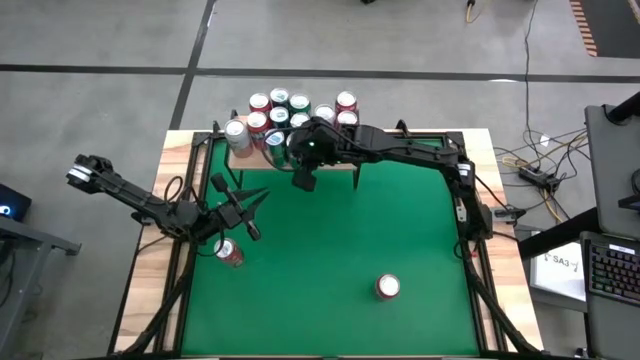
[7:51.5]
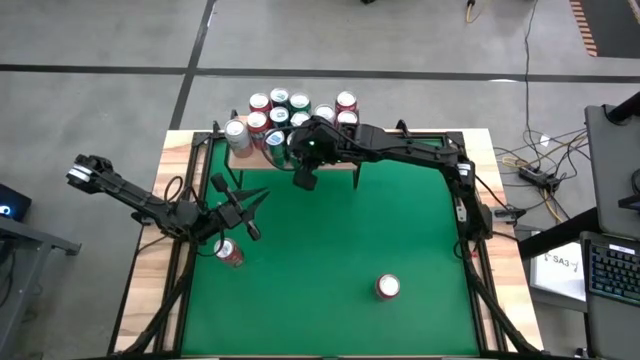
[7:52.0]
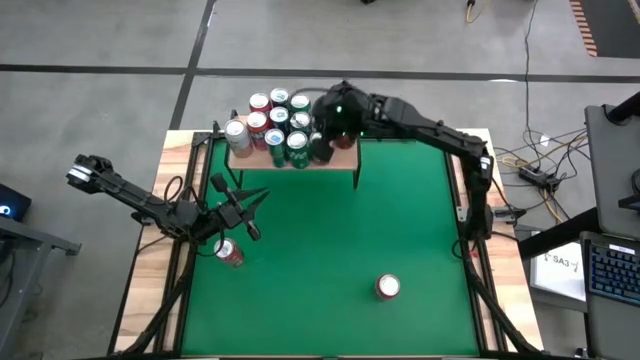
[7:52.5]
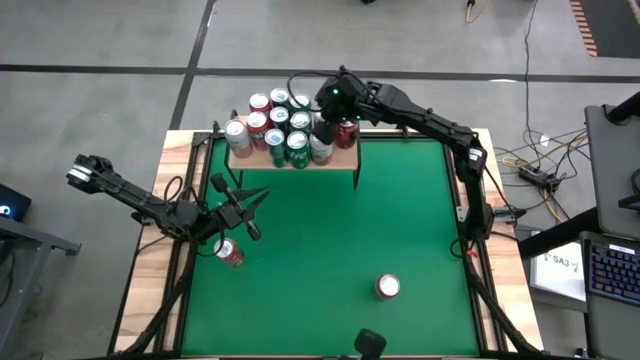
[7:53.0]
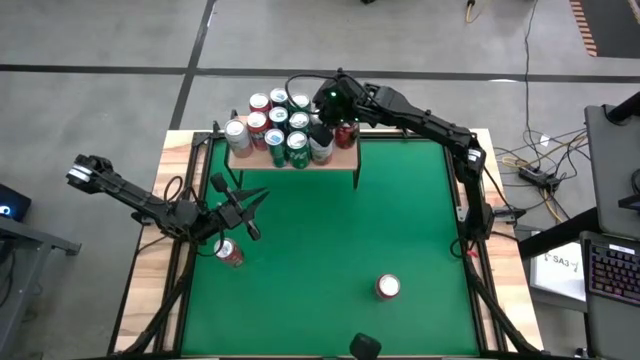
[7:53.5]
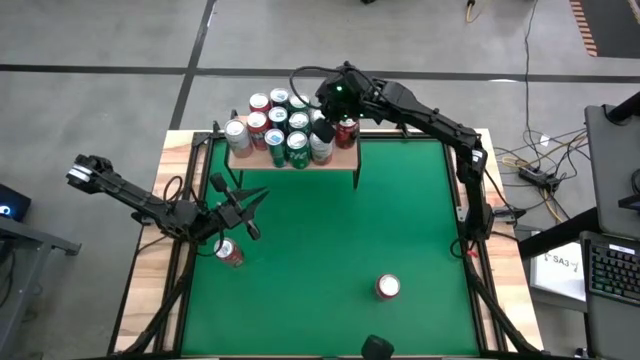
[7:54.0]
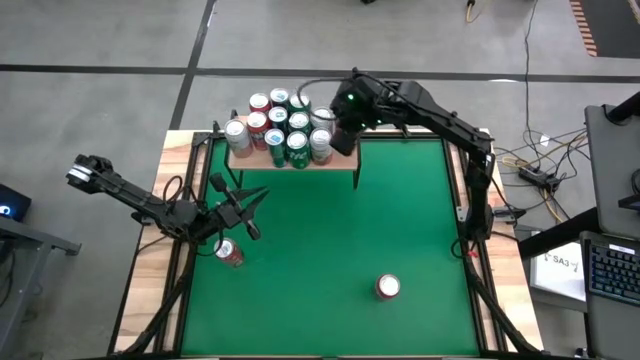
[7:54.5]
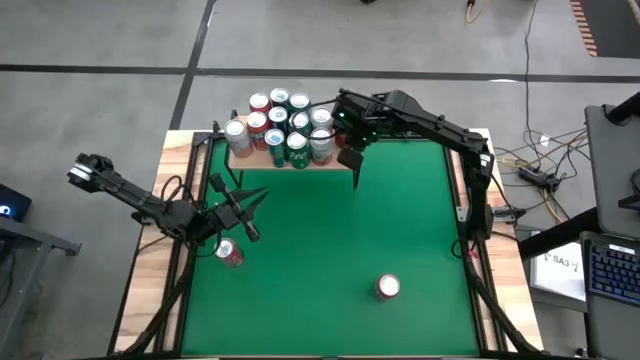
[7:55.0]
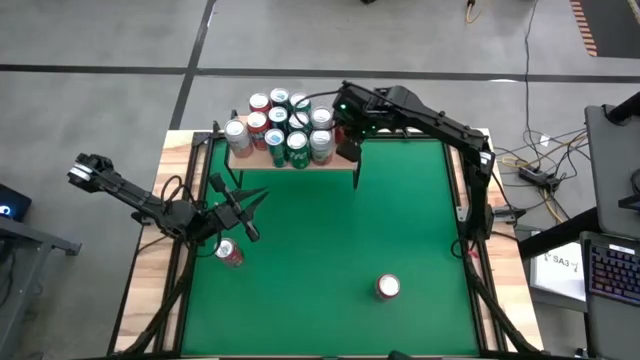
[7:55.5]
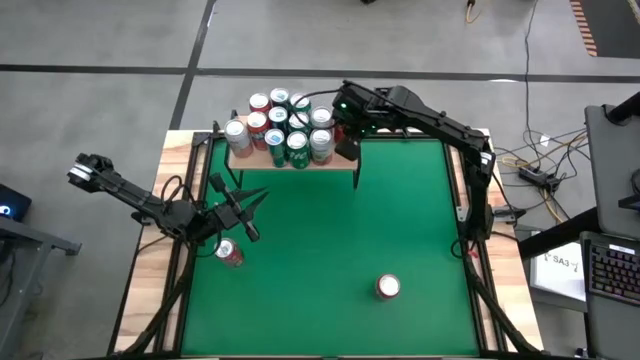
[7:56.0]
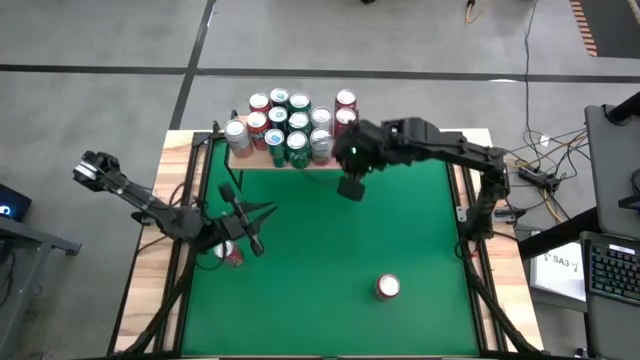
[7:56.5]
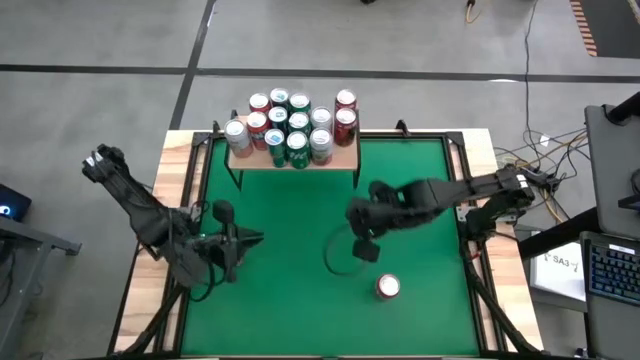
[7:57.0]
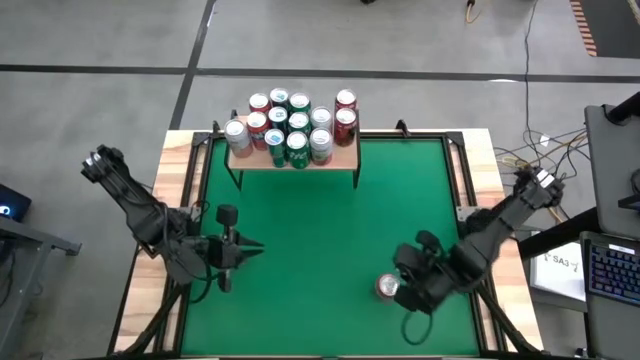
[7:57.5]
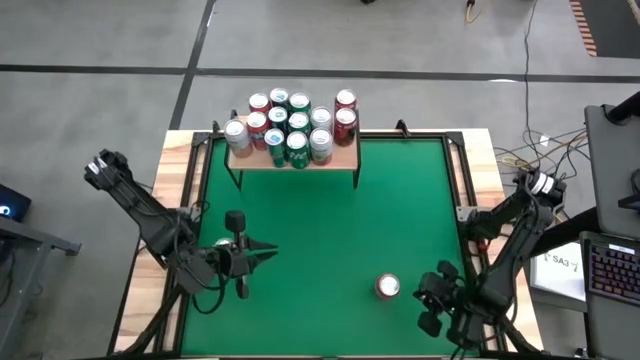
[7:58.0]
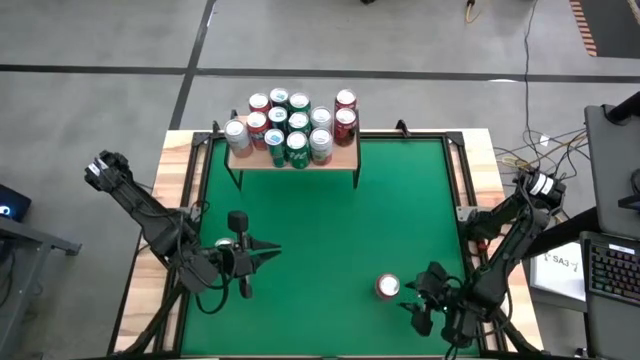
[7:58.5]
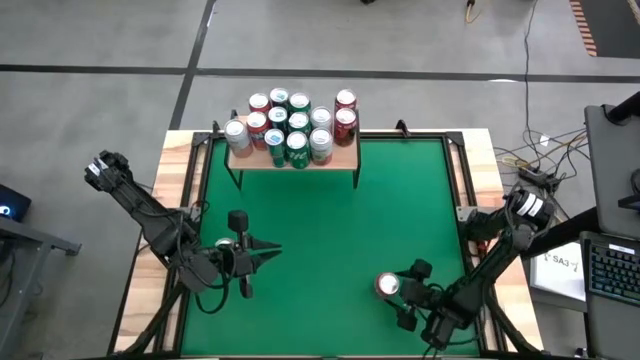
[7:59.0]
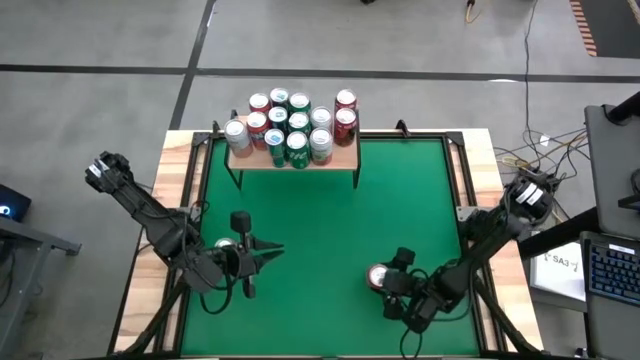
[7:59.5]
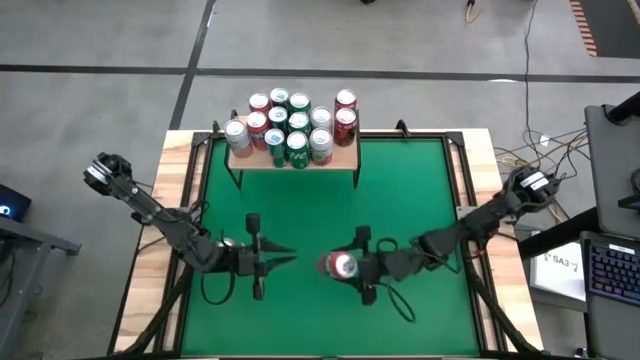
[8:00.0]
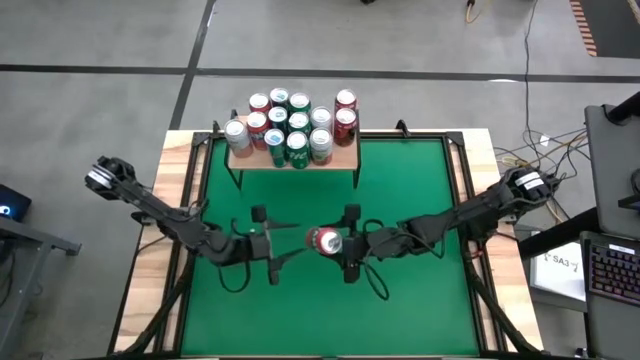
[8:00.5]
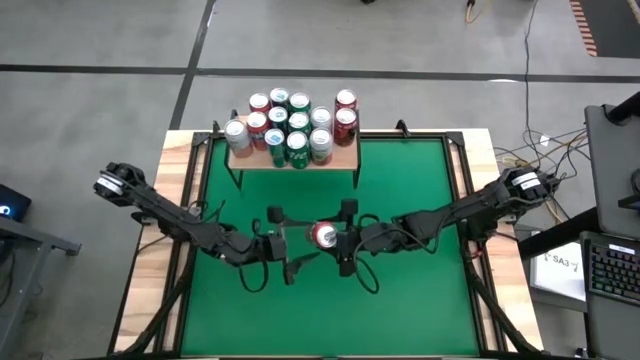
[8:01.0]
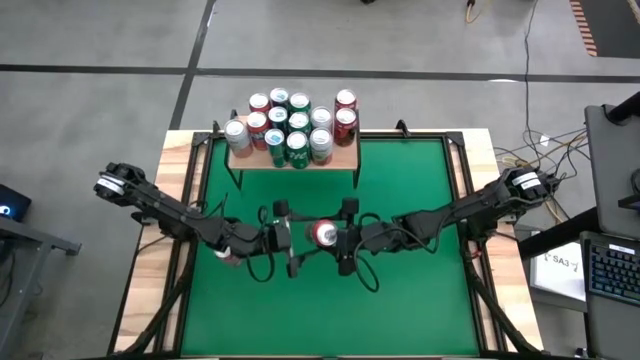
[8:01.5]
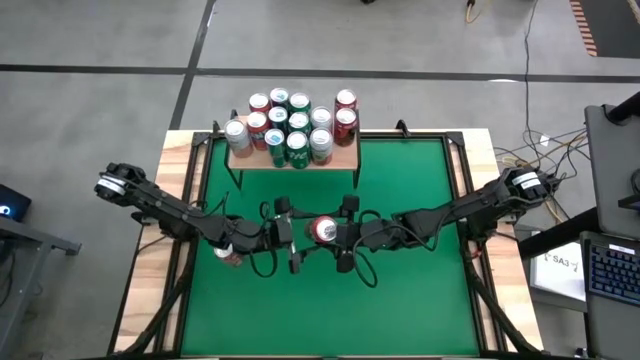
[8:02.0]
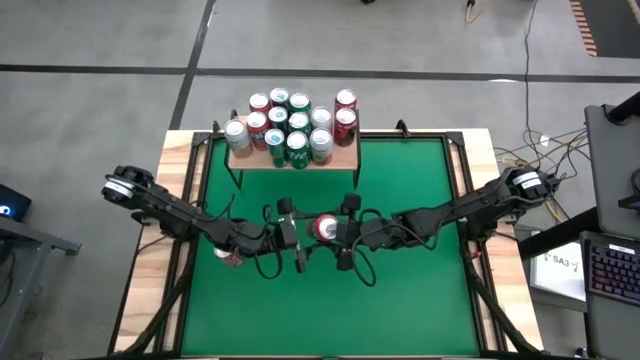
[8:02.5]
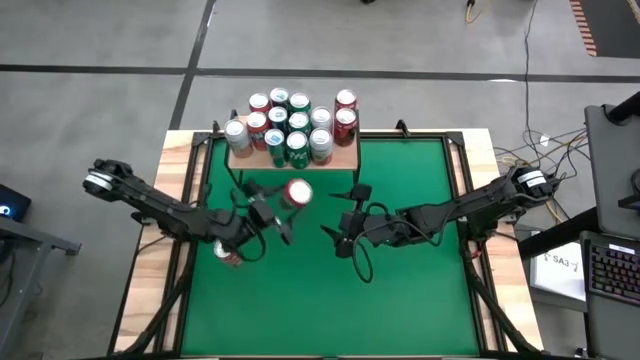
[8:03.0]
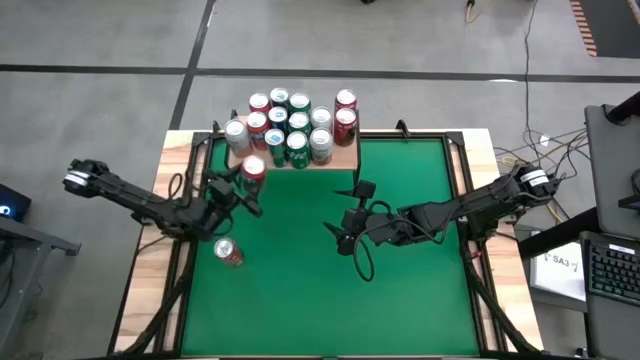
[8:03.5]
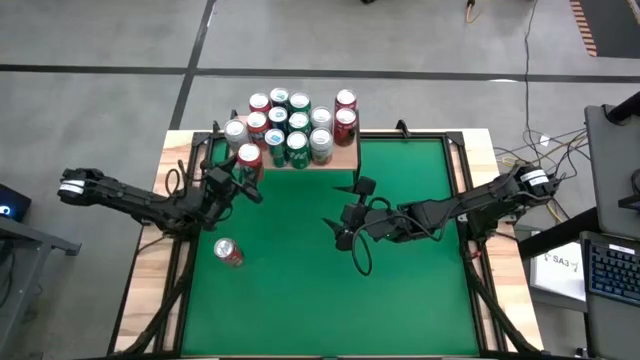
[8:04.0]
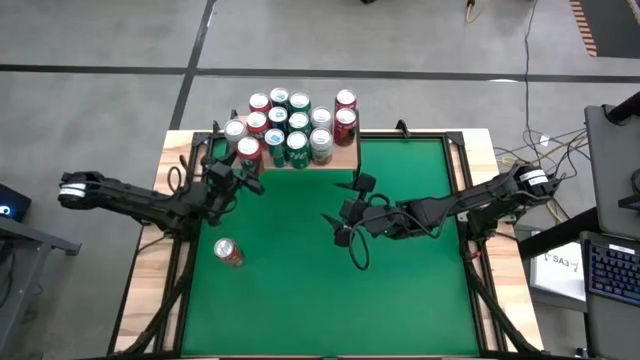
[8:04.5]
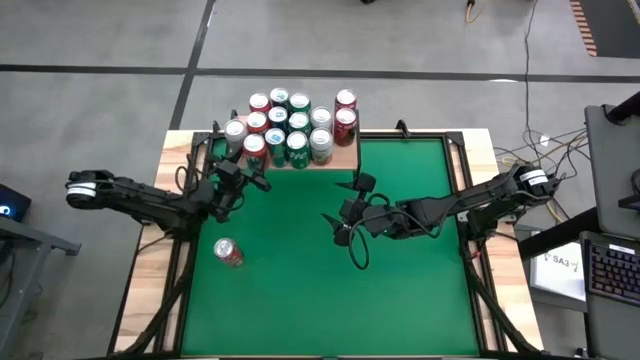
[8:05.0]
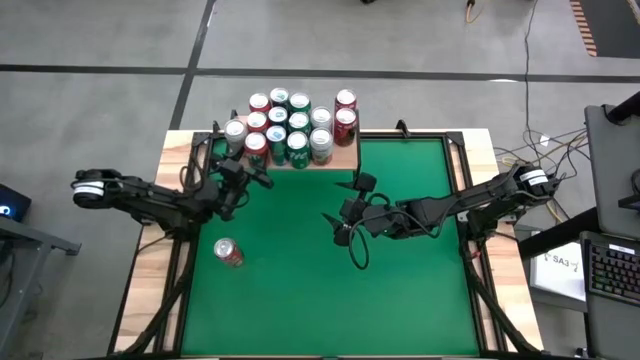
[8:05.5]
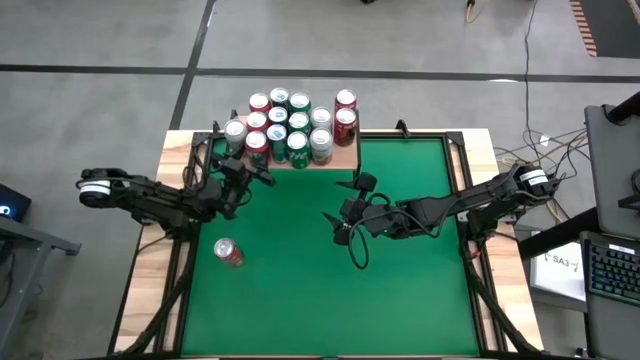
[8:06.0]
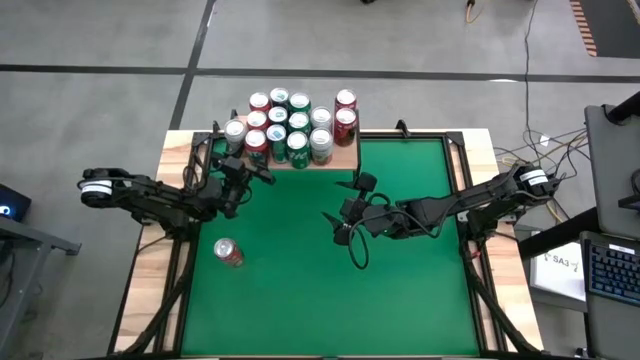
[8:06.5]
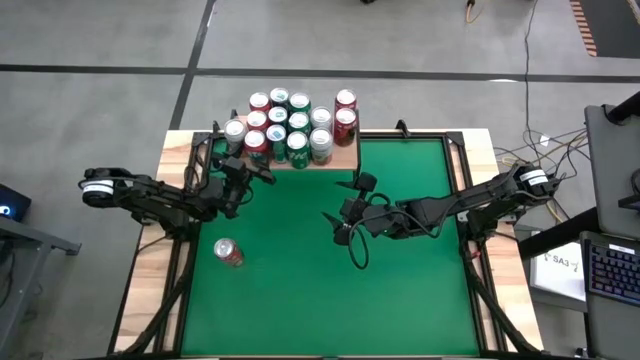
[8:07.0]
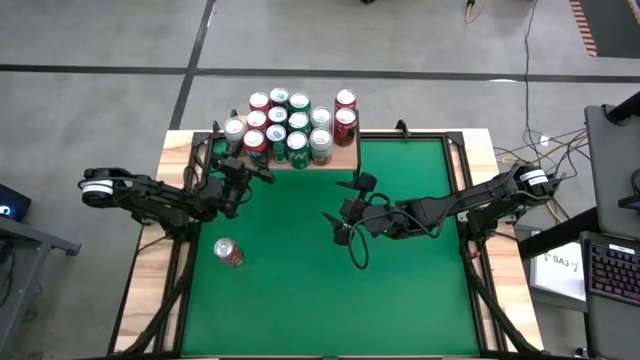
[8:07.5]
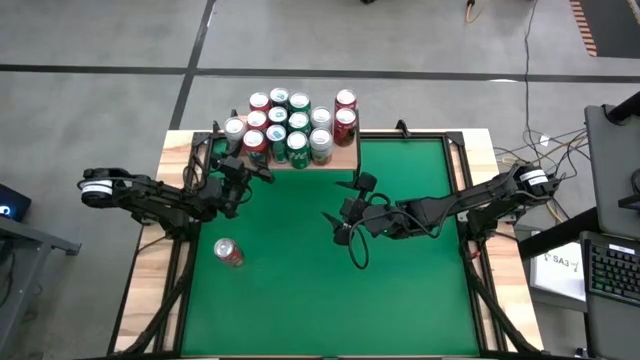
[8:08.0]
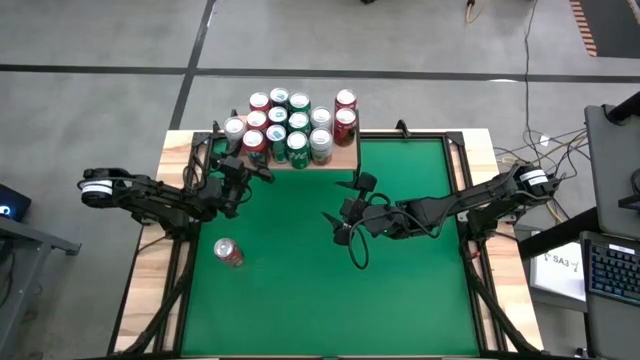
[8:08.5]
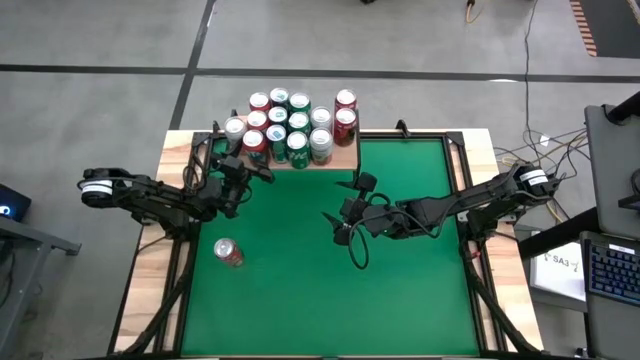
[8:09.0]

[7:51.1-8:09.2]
Task: Place canned beverage on shelf
Put the orange can on the shelf

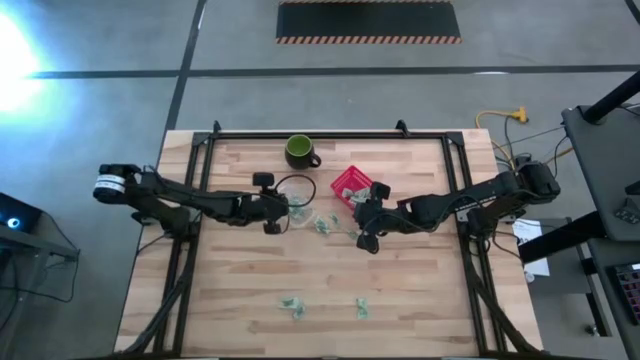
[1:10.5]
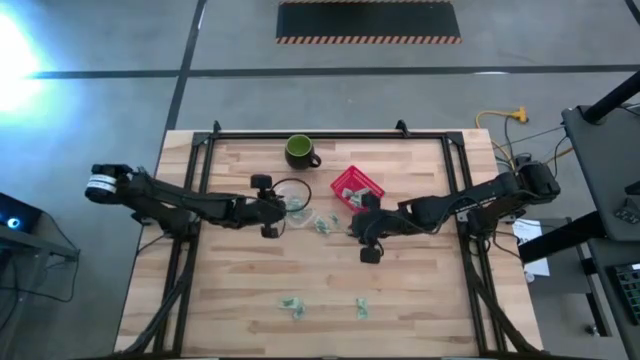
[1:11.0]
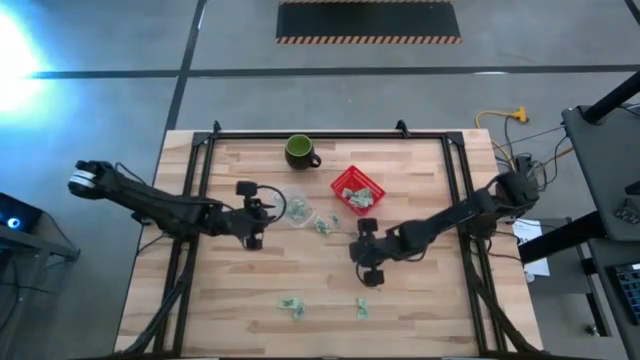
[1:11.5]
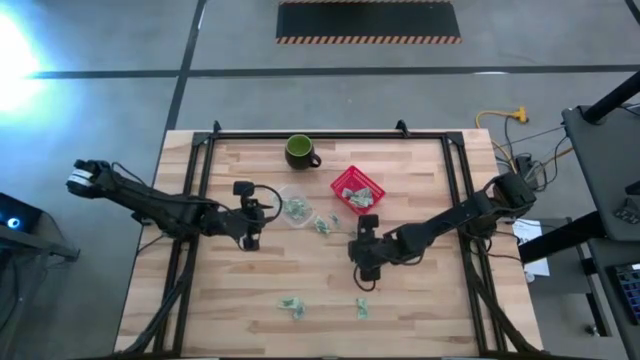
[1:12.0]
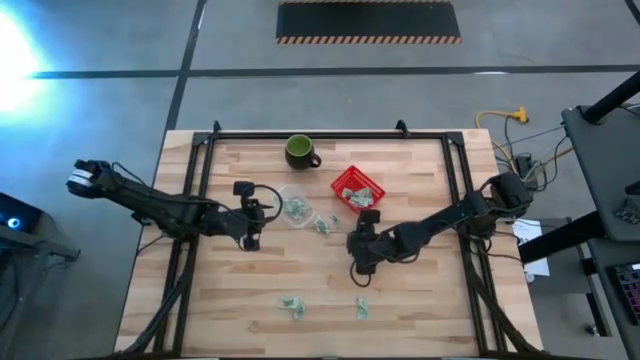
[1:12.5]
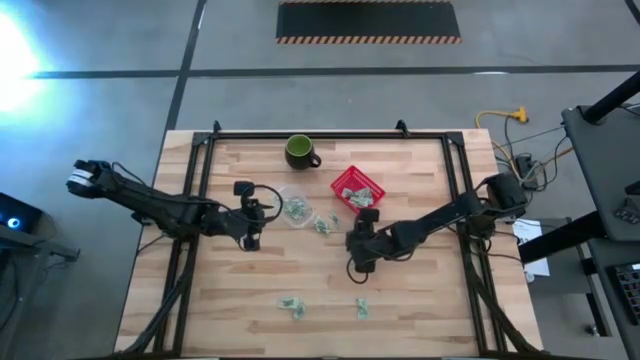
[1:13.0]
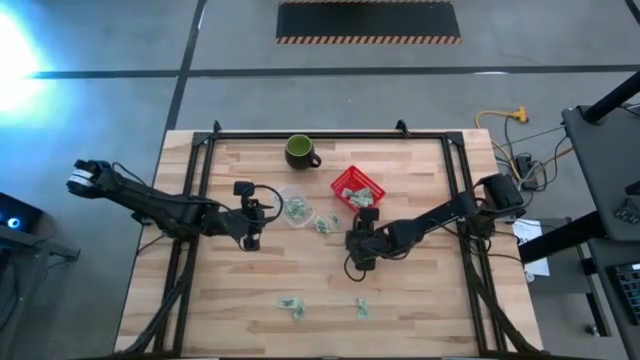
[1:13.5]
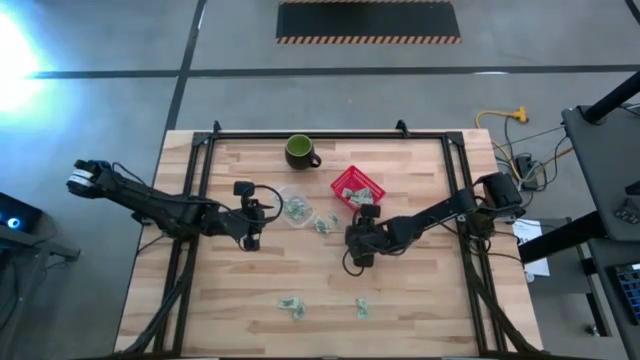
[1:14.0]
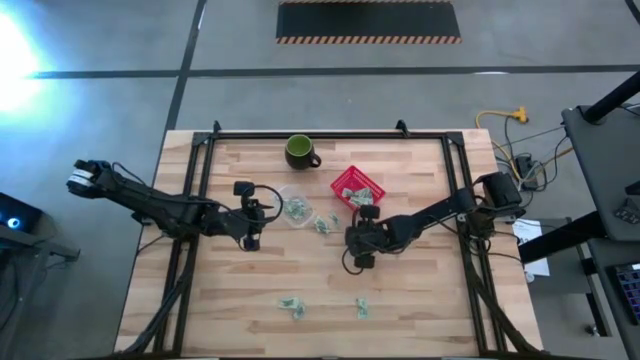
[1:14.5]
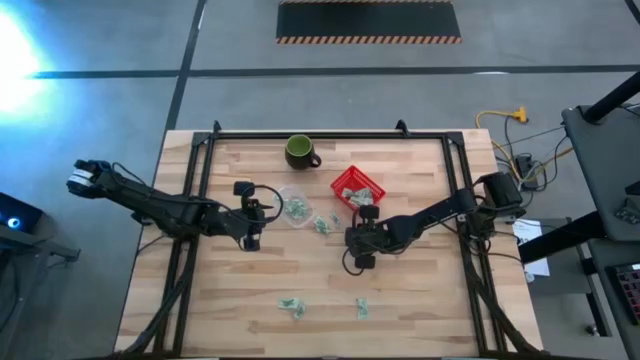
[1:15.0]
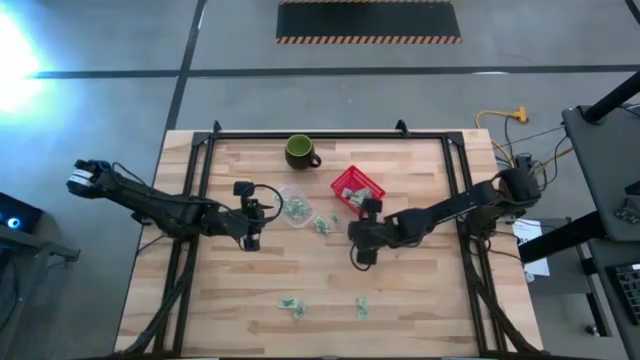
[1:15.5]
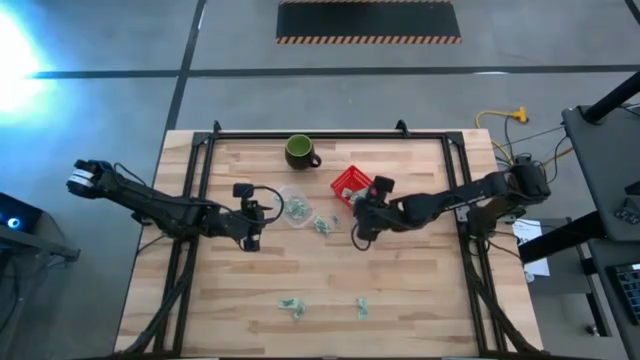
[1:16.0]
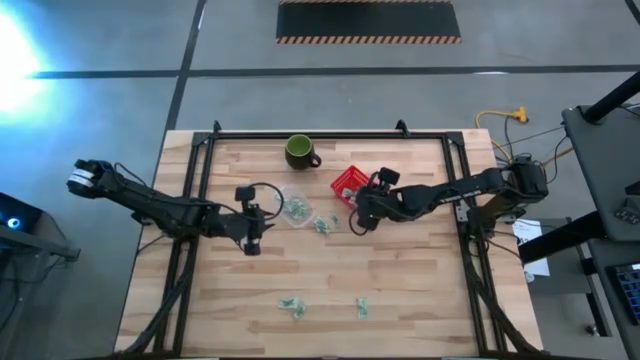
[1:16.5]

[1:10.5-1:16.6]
Task: Pick and place items into bin
Put the stevia packet into the red bin
